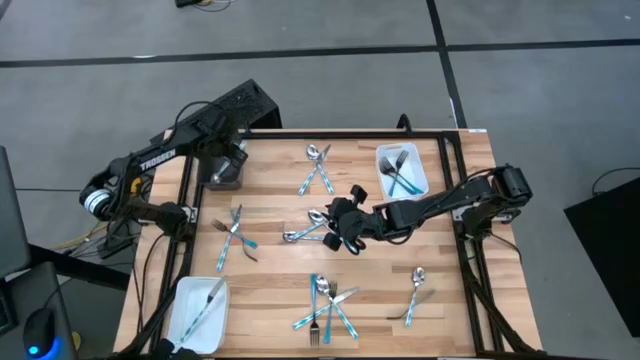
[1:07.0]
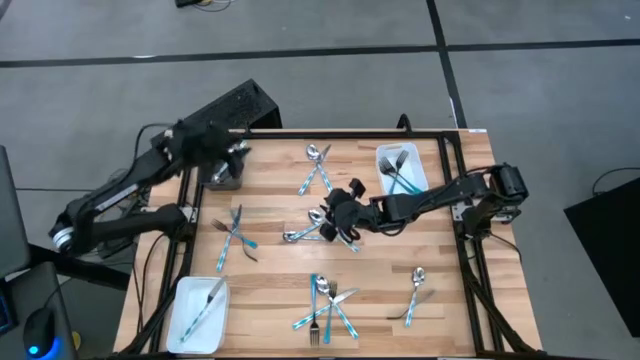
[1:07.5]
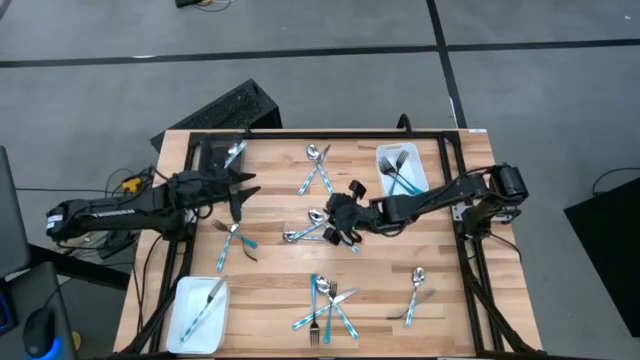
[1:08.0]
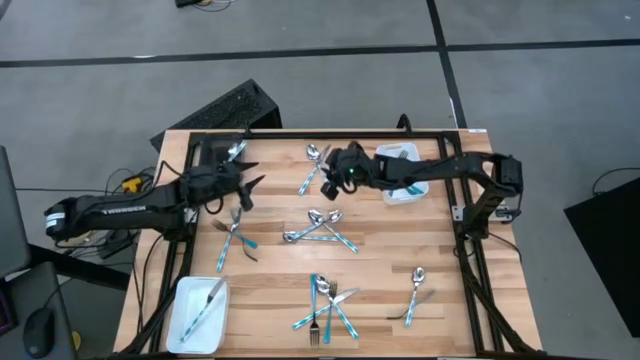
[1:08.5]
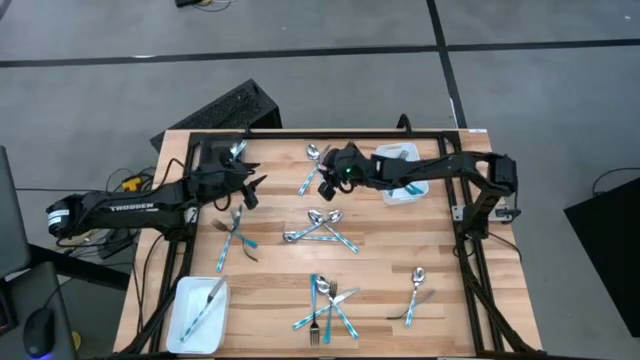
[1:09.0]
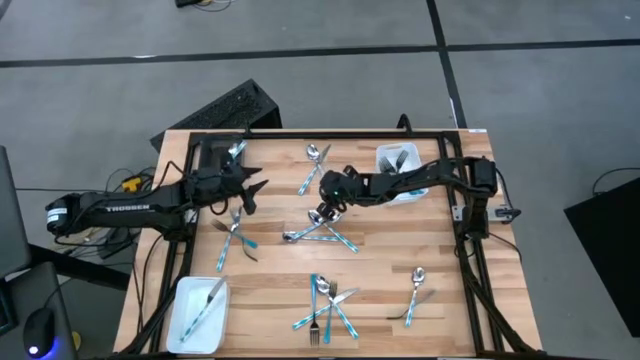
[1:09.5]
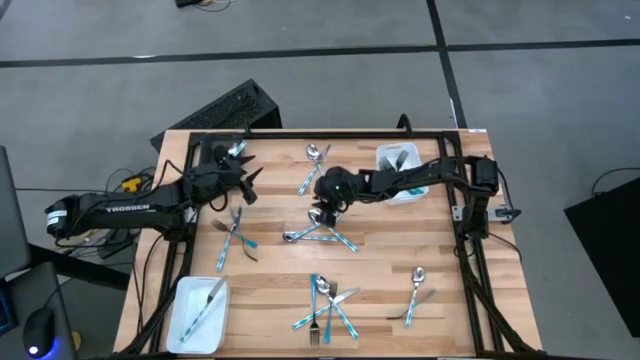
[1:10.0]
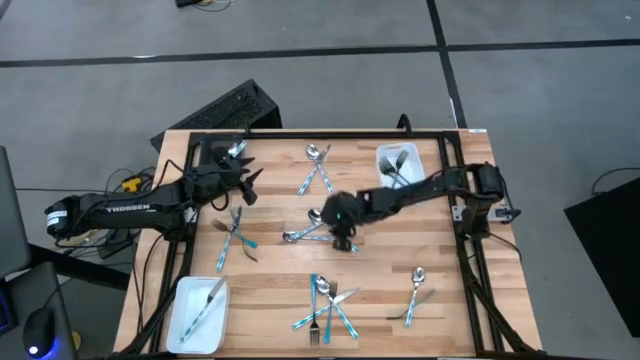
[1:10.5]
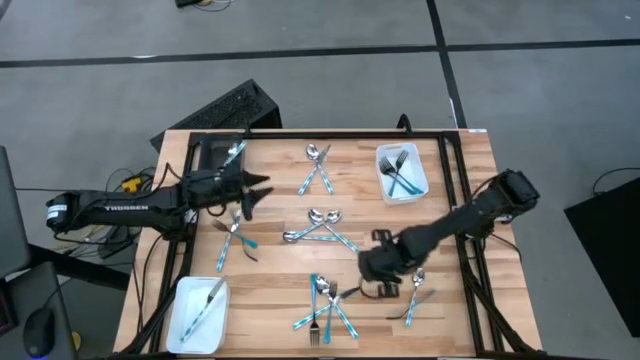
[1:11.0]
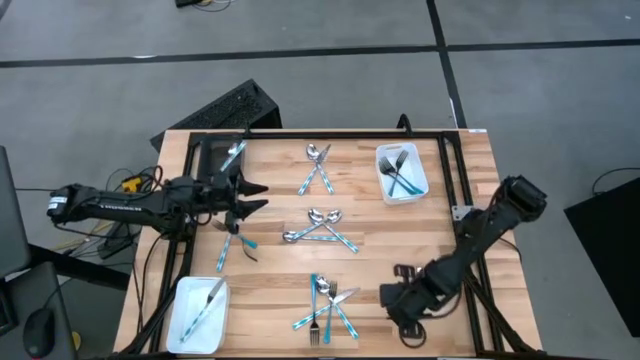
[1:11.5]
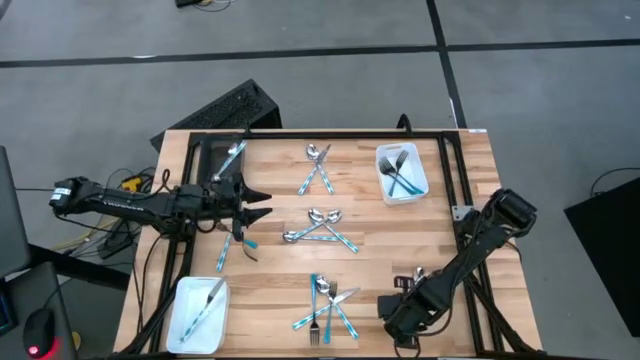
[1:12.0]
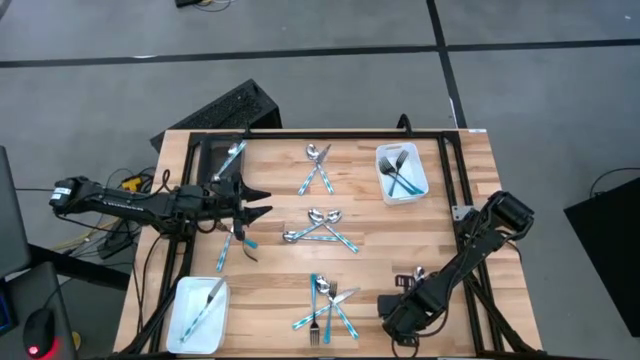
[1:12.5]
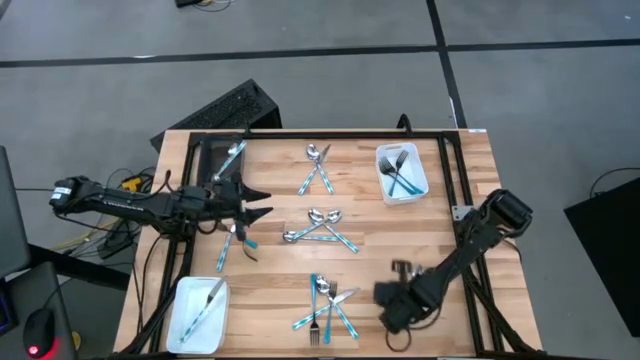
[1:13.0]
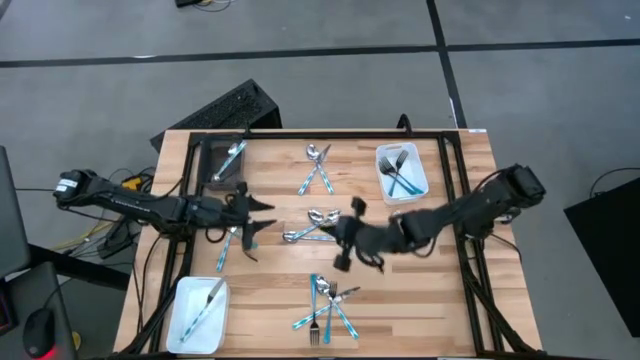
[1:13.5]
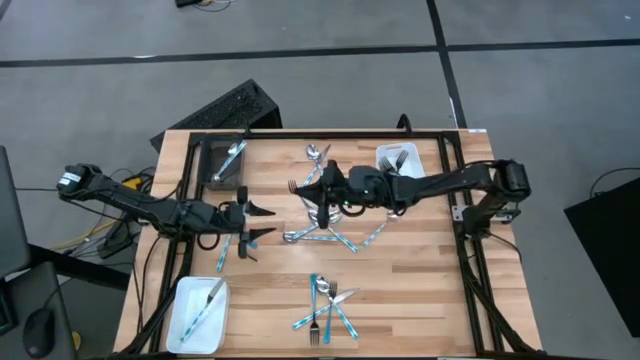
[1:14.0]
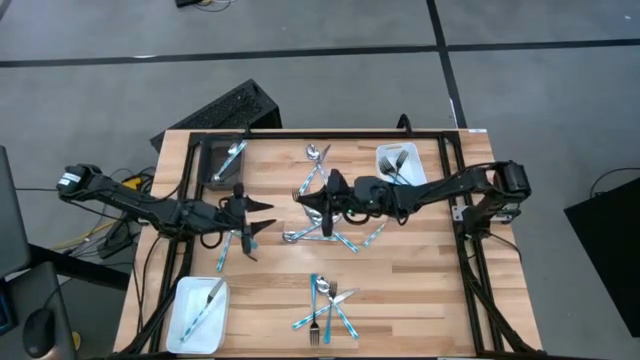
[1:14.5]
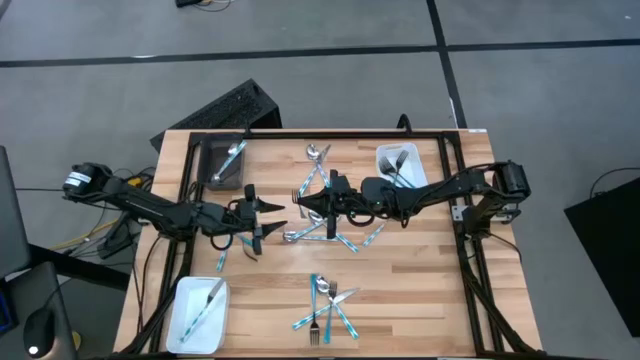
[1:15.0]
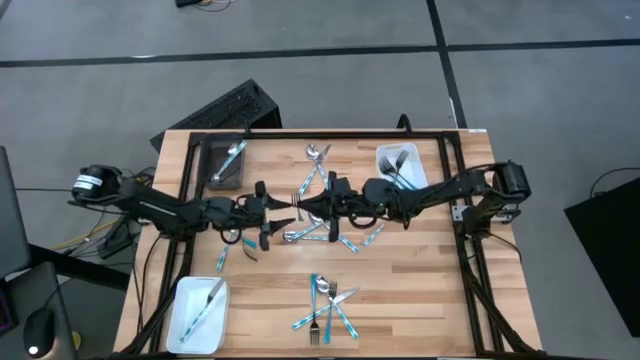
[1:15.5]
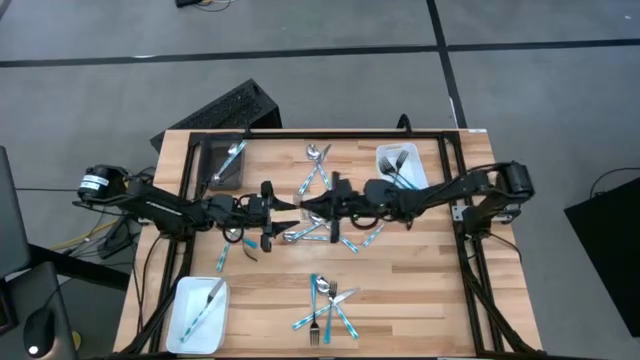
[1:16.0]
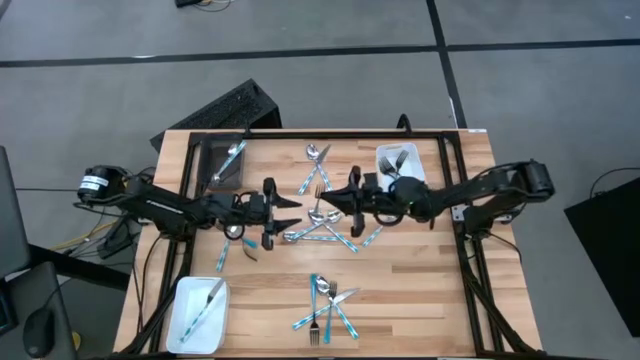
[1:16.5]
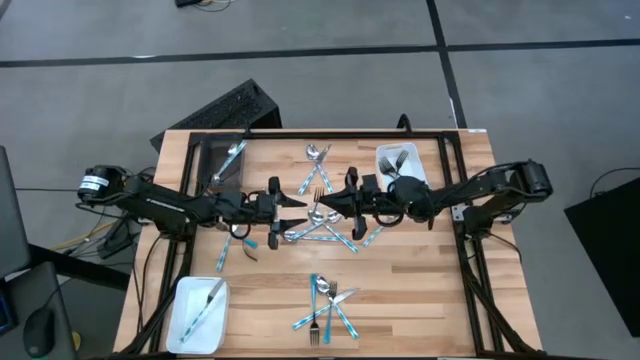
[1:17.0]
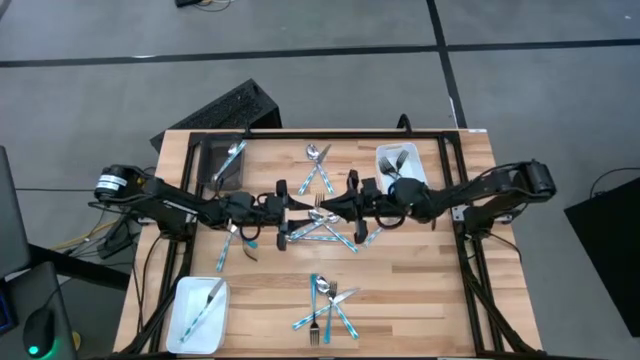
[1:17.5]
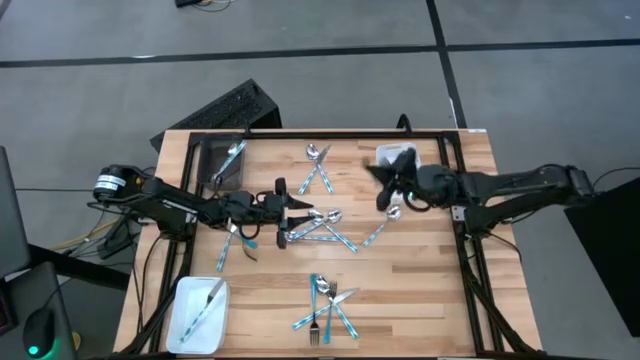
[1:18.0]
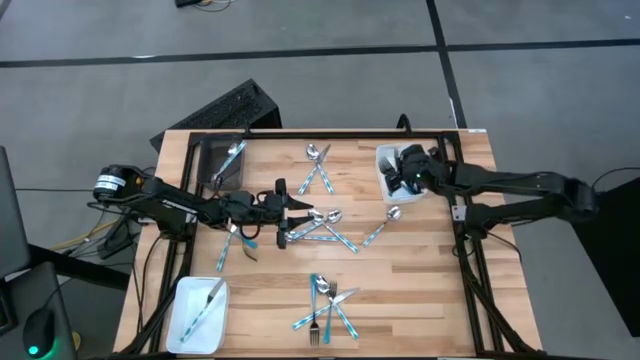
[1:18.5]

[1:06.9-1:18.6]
Task: Sort silverware by color (type)
Put the blue fork into the top white bin

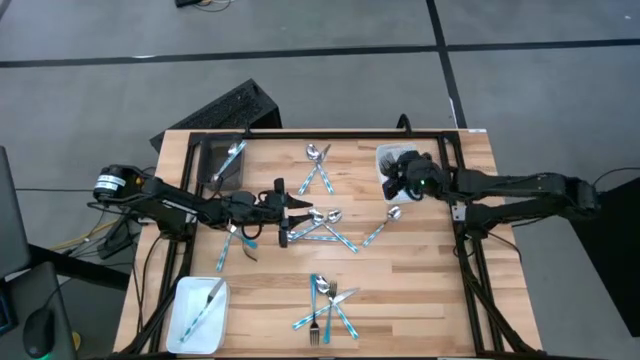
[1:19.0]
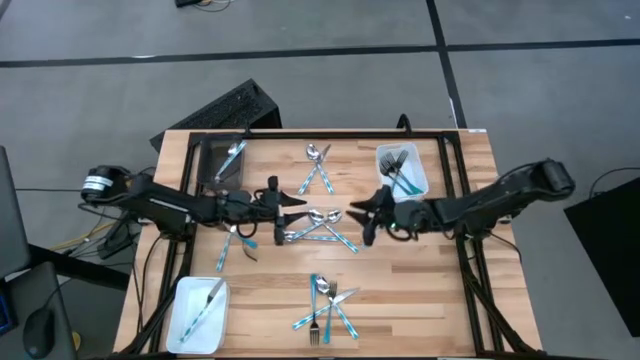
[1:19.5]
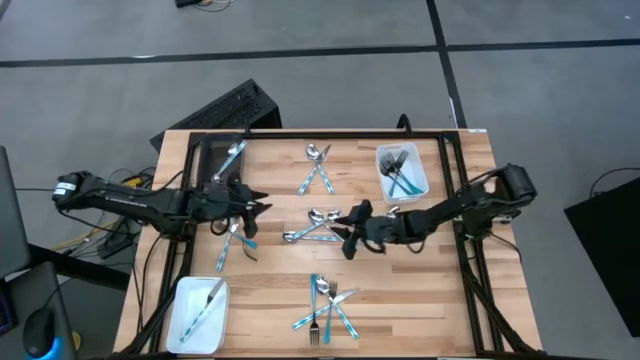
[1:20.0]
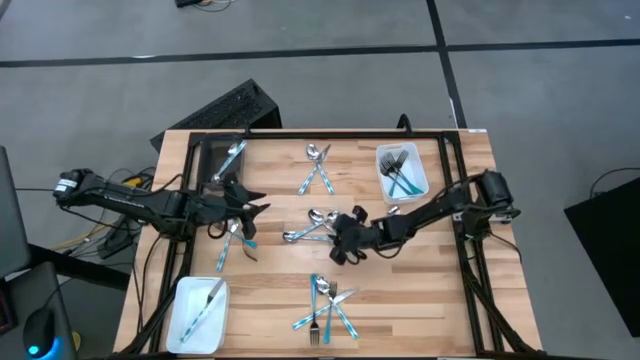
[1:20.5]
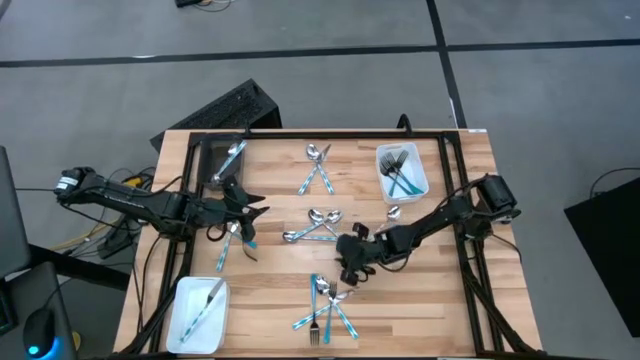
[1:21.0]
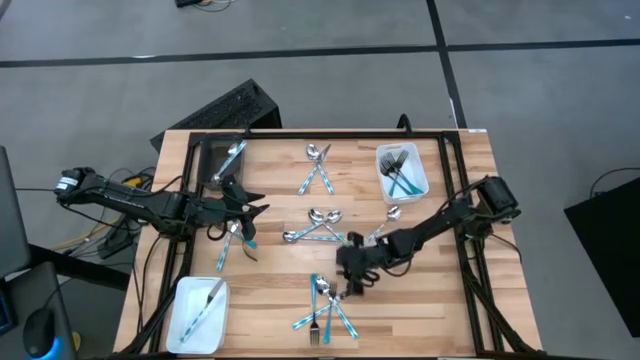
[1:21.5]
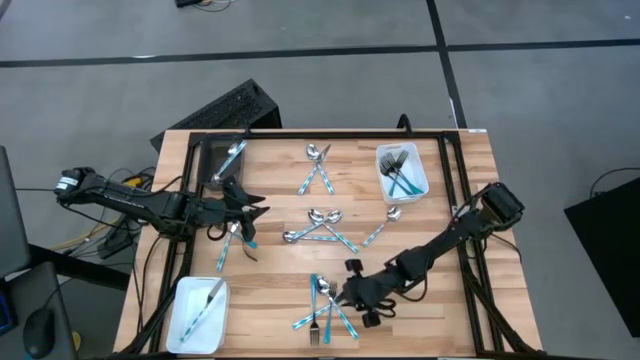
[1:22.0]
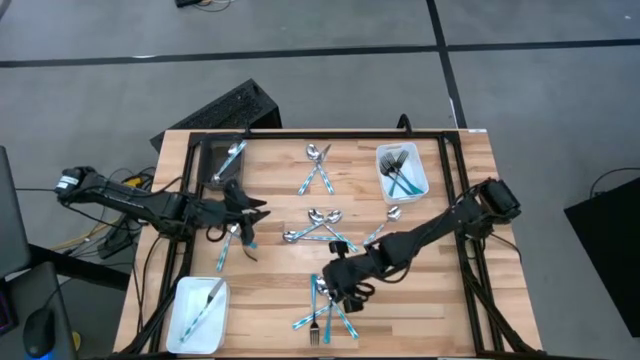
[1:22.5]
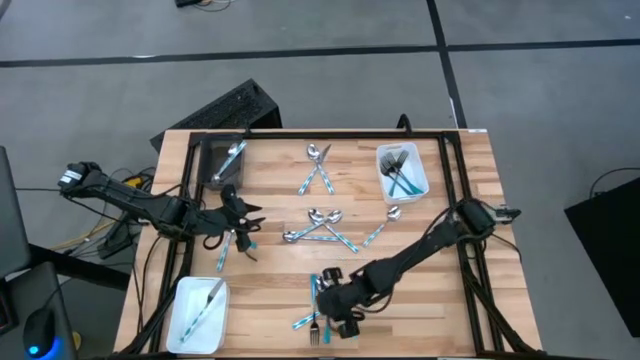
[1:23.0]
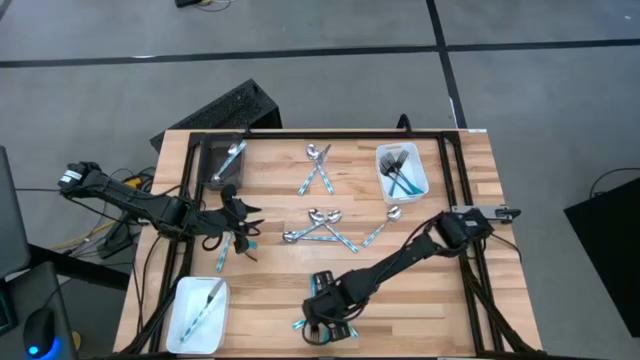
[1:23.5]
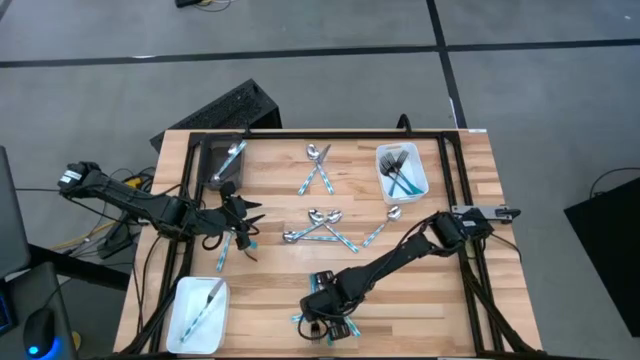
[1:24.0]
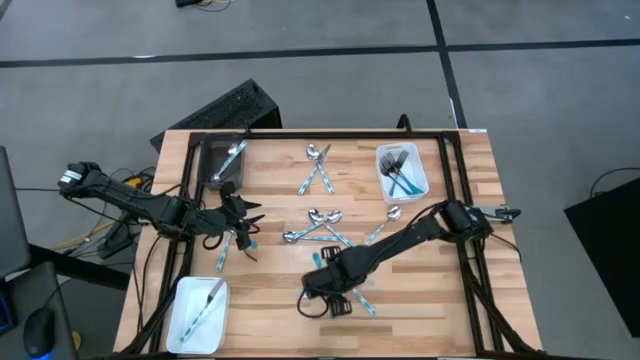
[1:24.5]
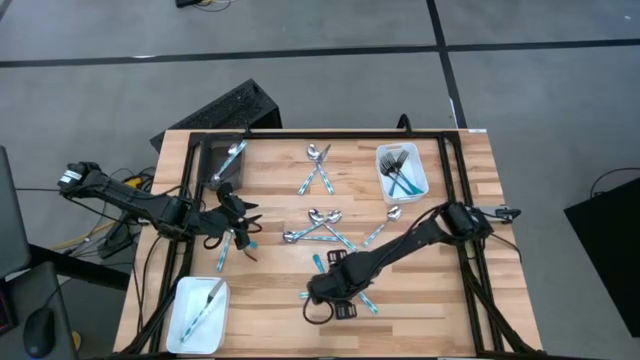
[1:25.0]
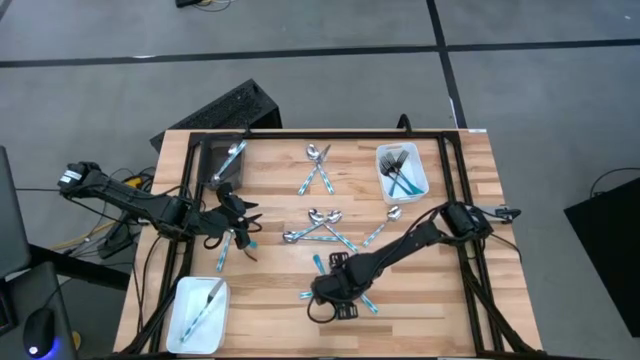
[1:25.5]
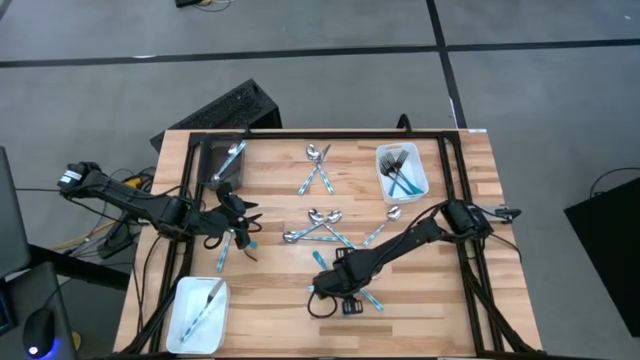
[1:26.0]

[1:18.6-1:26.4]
Put the light blue table knife into the bottom white bin

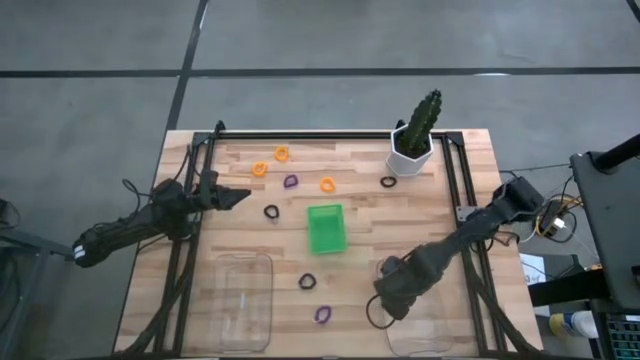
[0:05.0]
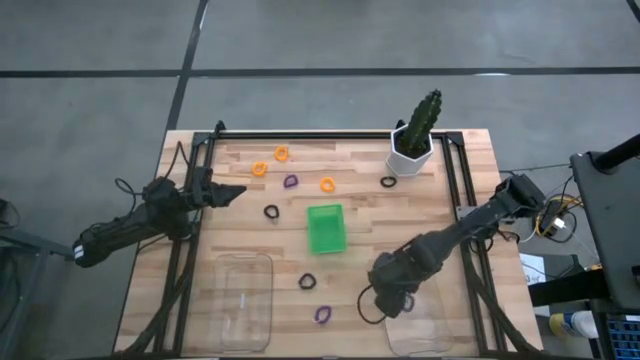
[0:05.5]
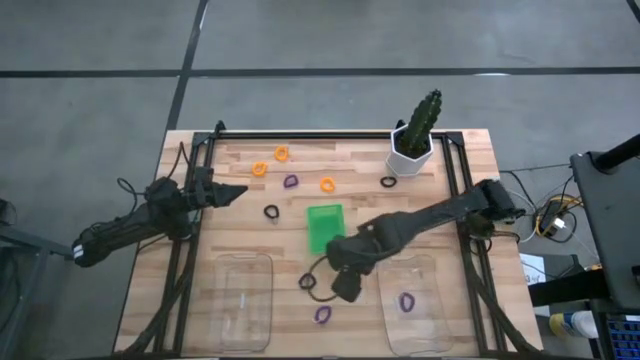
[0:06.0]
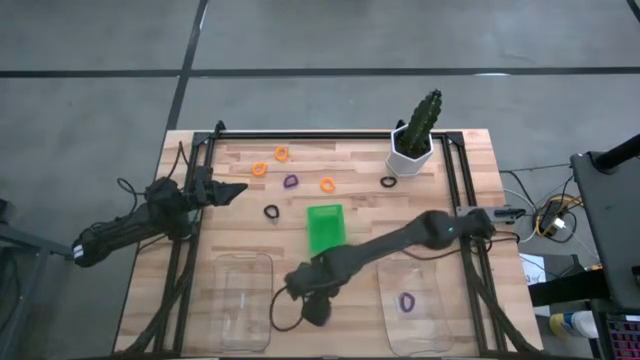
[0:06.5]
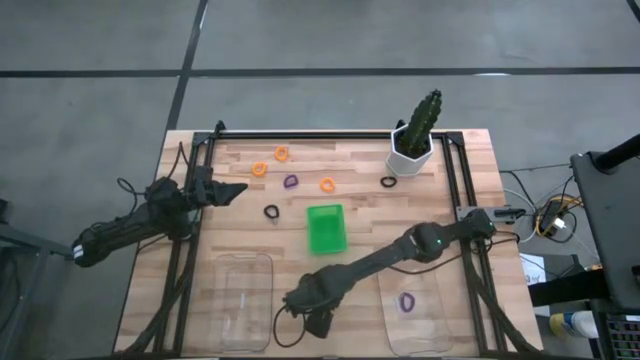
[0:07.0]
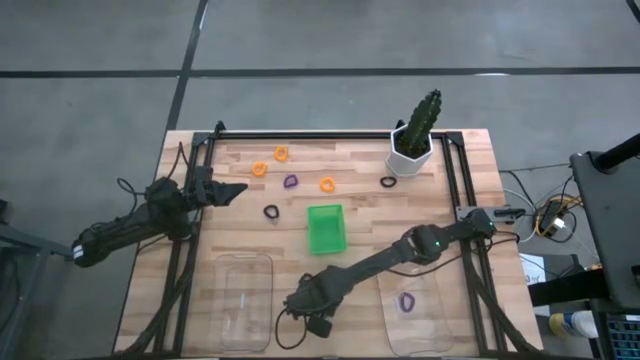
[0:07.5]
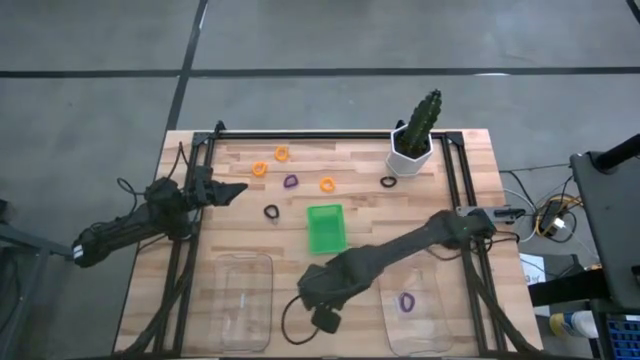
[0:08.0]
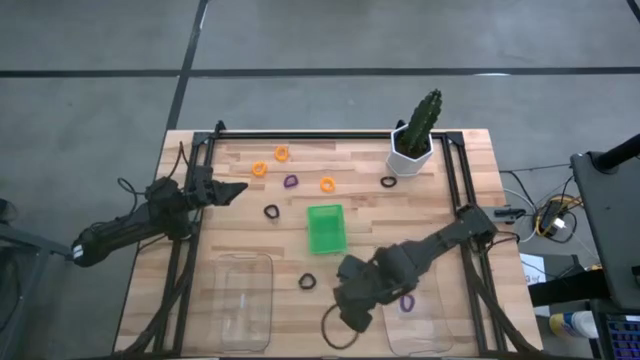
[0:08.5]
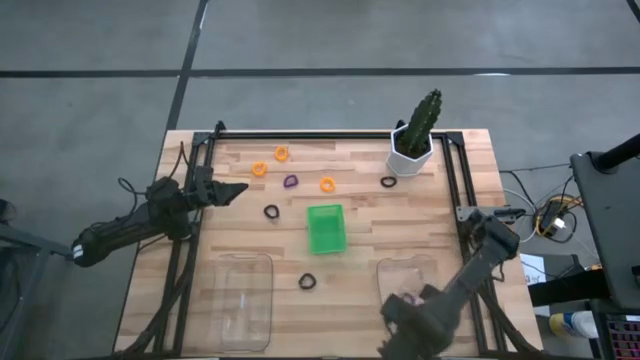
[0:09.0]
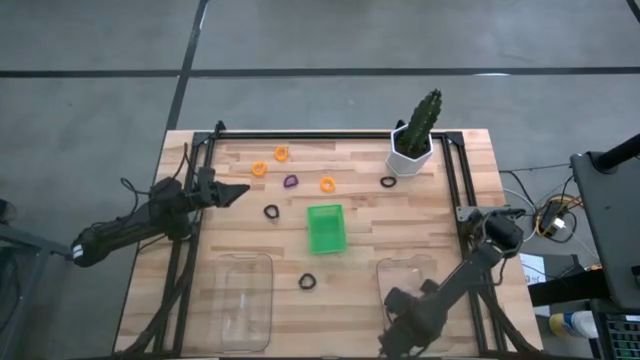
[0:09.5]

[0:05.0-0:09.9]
Task: Sort spring keychains
Put the bottom purple spring keychain into the right transparent bin
